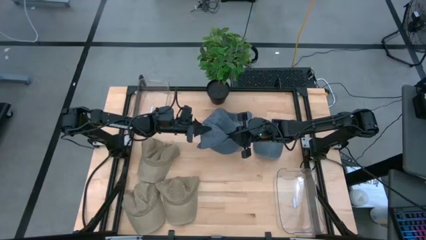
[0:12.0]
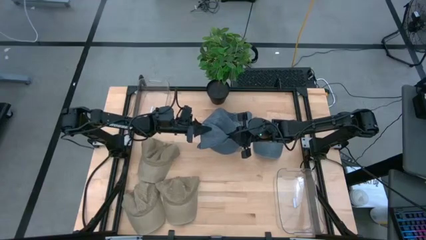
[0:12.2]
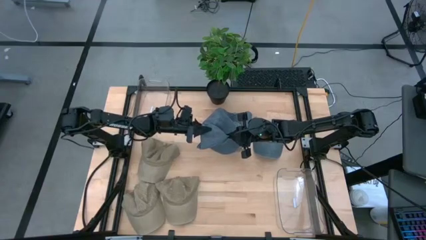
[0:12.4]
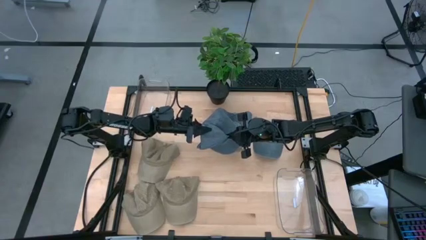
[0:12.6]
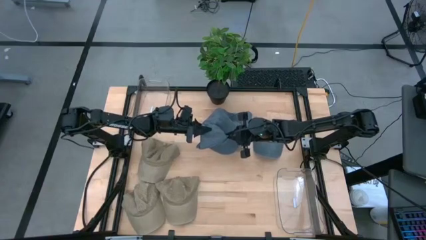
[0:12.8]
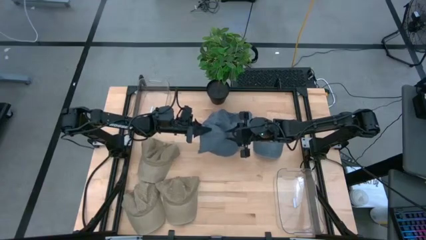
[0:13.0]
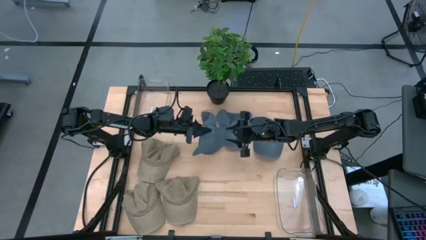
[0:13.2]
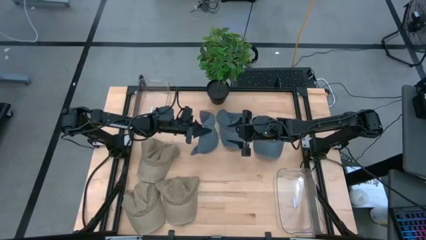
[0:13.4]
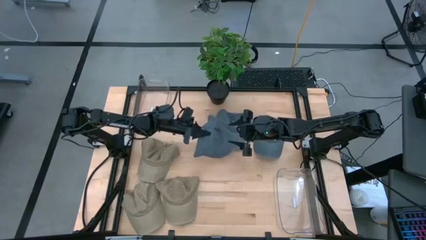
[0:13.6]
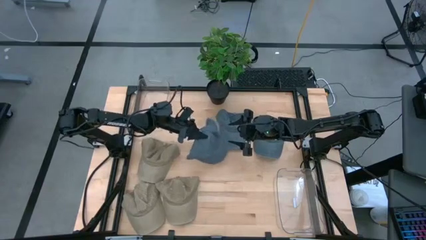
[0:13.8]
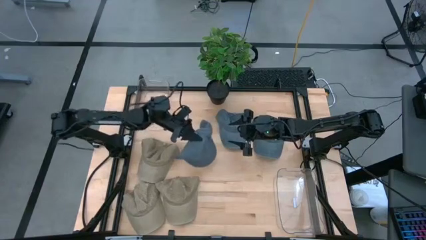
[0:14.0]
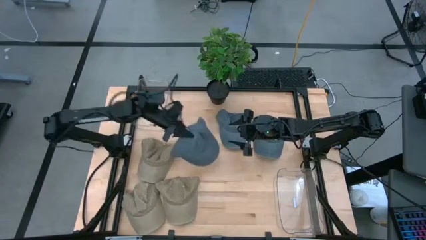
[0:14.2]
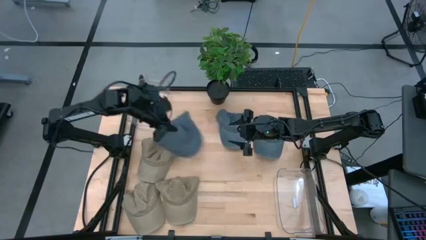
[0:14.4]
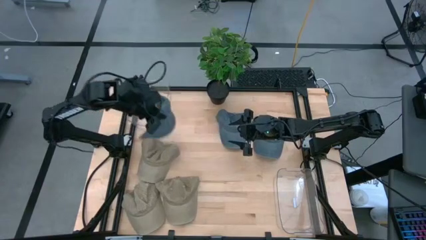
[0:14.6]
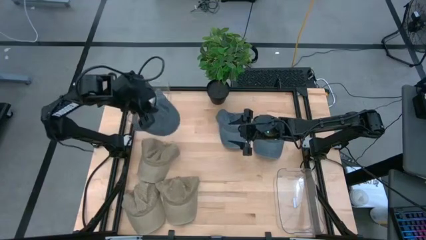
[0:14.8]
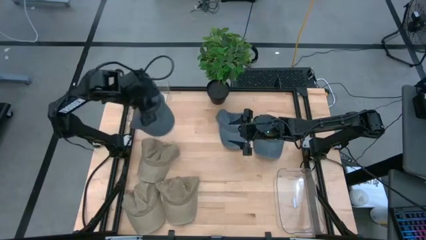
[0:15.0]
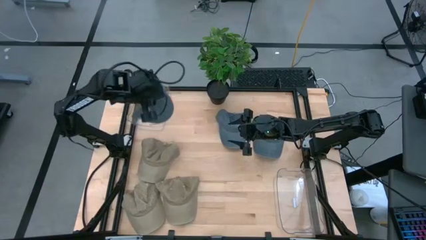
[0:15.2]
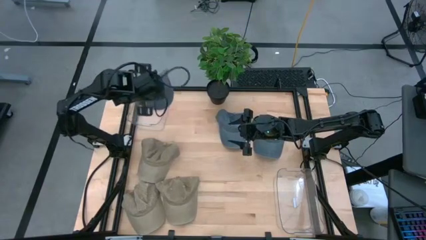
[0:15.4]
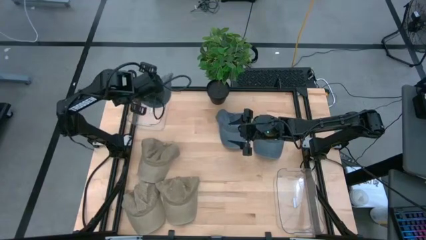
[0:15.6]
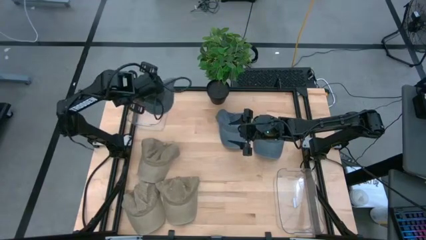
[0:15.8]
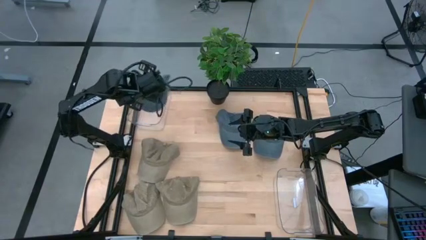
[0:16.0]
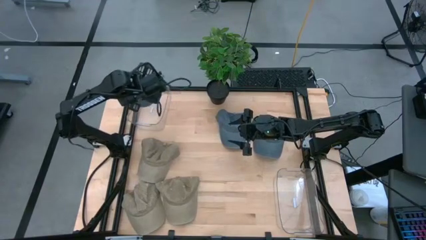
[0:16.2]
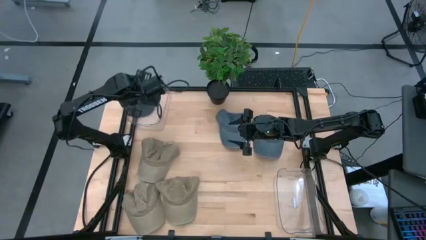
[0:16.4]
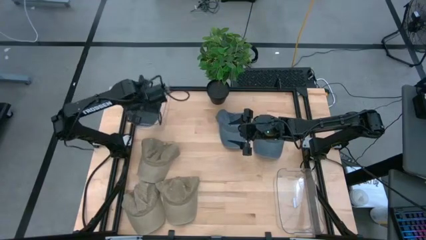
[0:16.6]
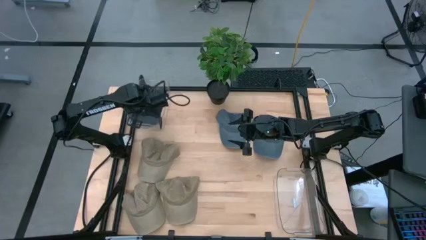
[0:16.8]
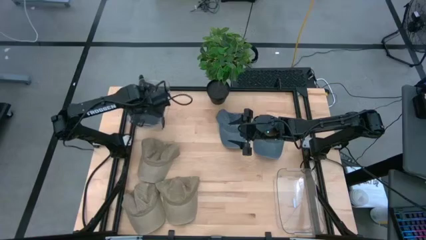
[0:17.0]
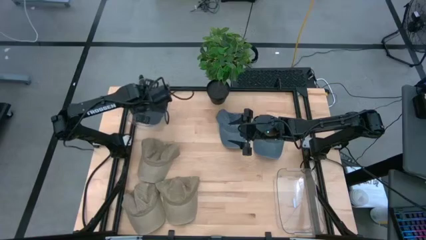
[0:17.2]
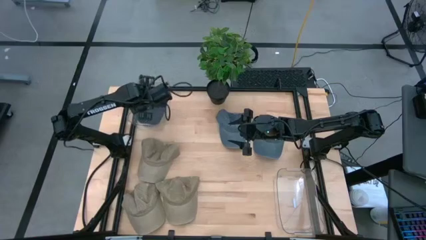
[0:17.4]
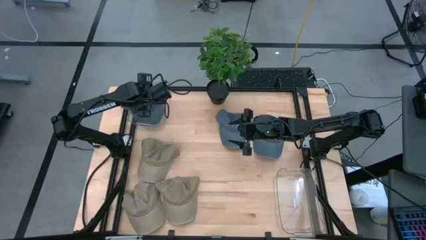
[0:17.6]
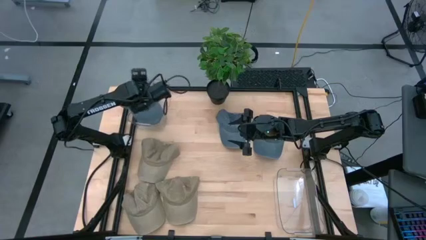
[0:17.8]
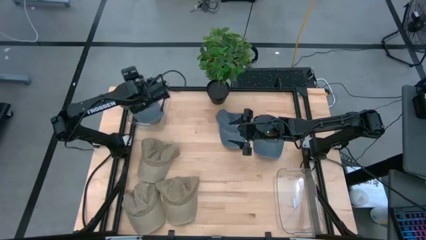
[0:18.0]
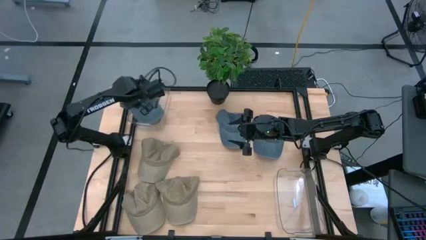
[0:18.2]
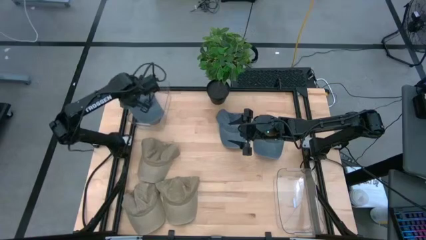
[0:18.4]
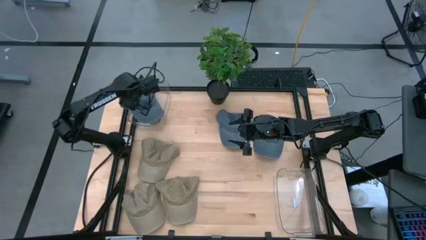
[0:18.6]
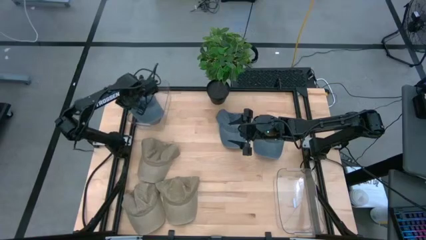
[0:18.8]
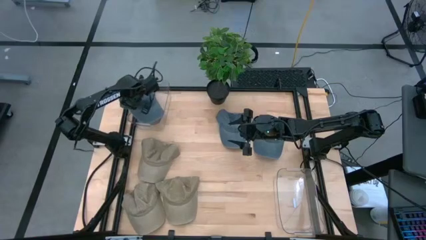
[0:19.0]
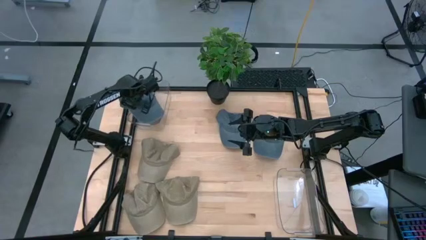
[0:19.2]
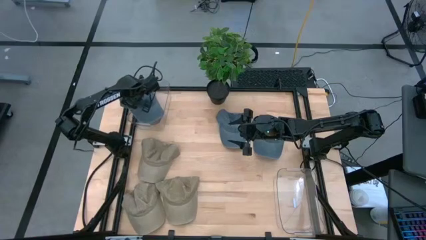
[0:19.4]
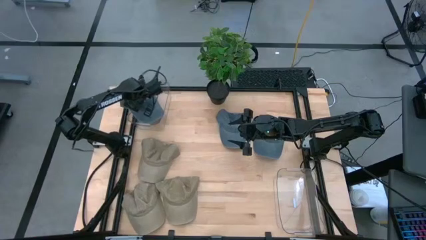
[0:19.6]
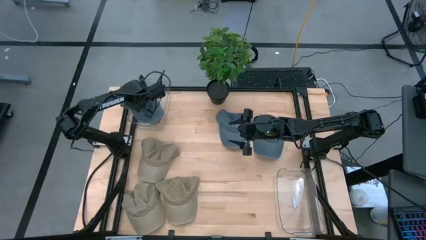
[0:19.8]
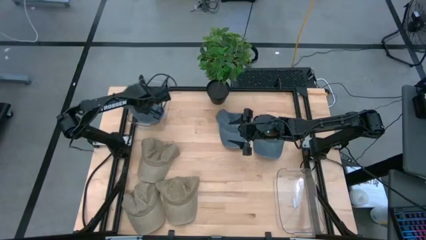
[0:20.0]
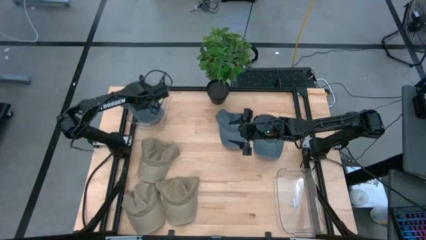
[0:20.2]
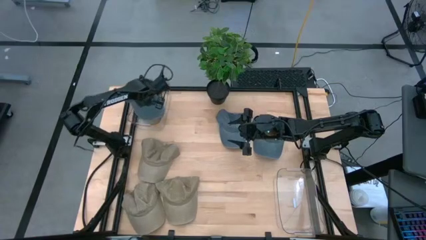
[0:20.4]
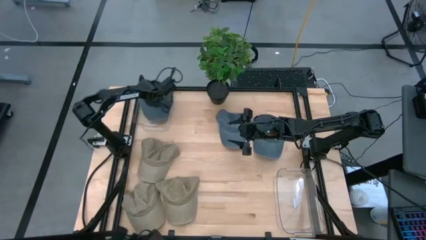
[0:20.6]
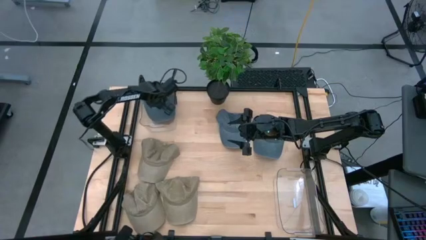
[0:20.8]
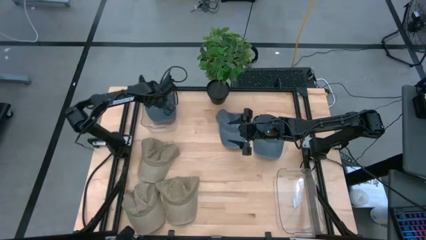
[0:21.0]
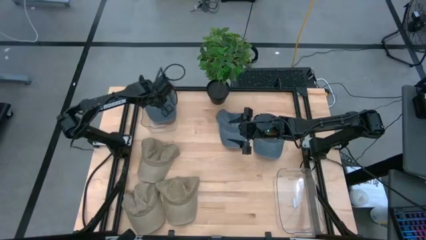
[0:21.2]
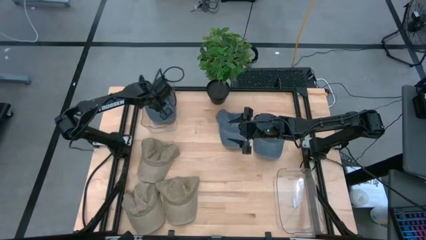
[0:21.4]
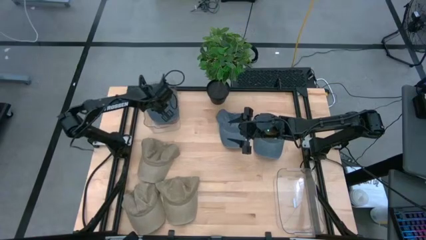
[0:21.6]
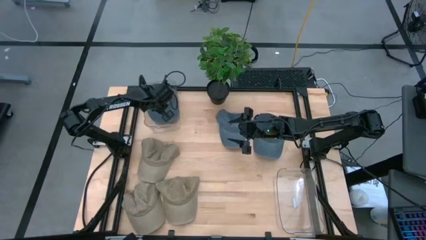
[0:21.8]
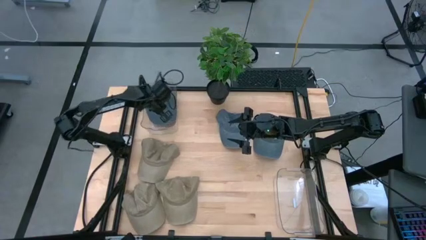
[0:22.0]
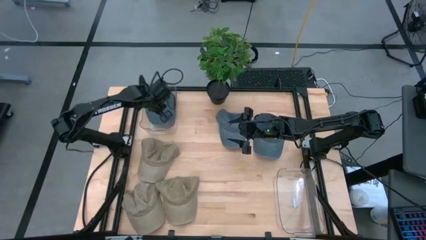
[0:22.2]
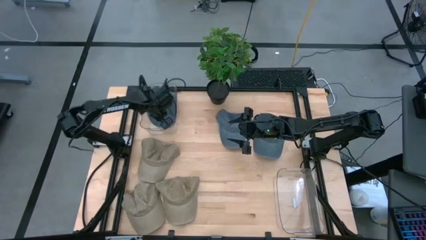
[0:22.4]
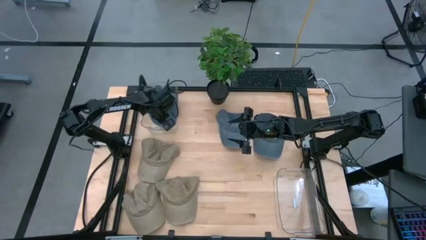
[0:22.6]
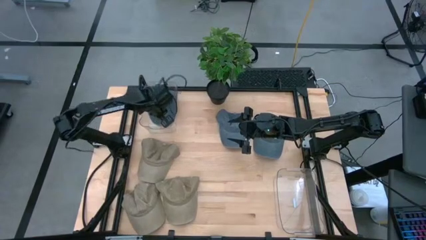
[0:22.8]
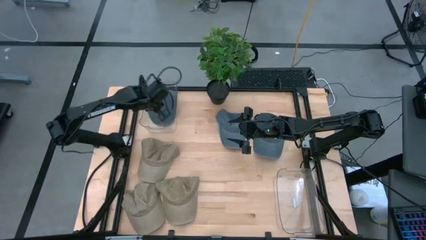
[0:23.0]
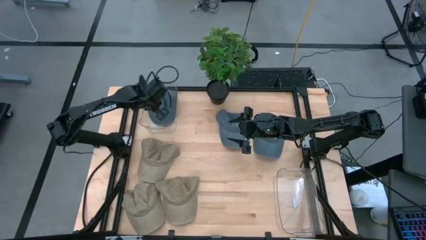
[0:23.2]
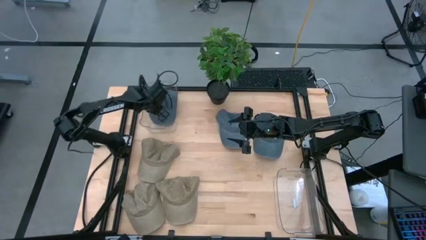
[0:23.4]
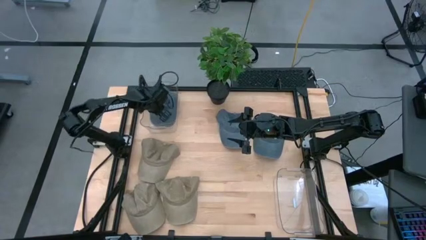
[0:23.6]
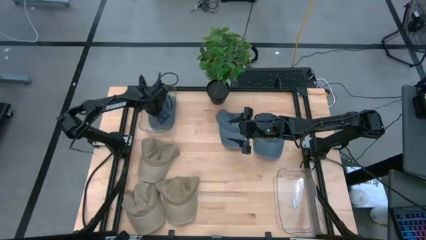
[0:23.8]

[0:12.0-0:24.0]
Task: Pick & Place hat
Put the top blue cap into the left transparent bin

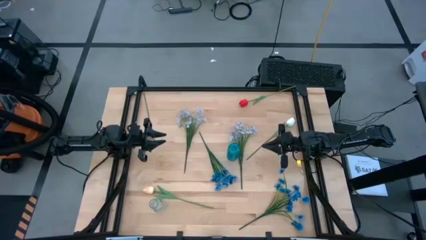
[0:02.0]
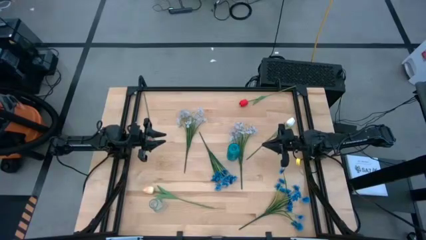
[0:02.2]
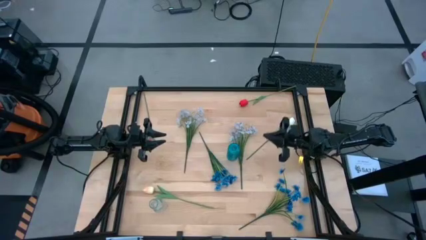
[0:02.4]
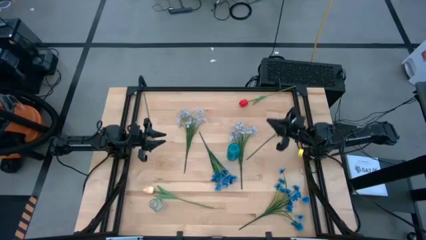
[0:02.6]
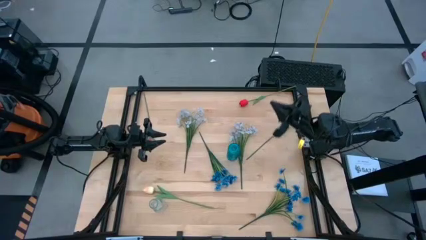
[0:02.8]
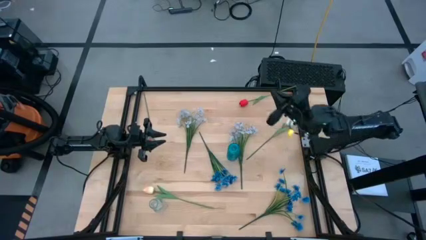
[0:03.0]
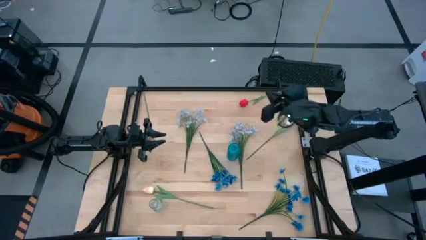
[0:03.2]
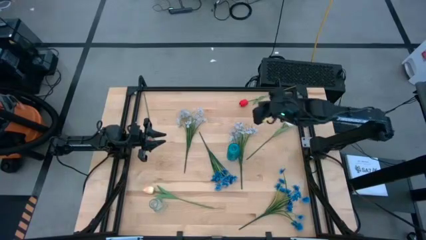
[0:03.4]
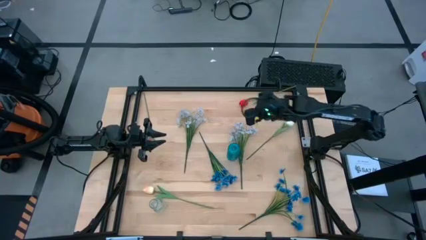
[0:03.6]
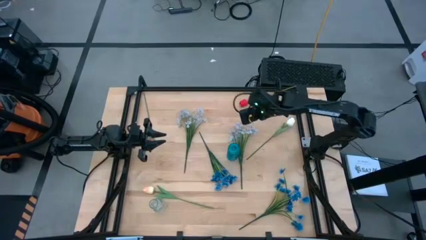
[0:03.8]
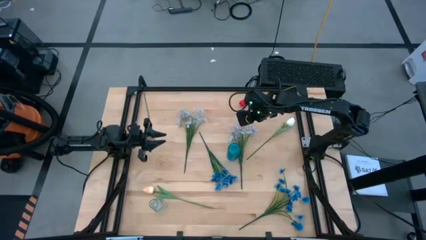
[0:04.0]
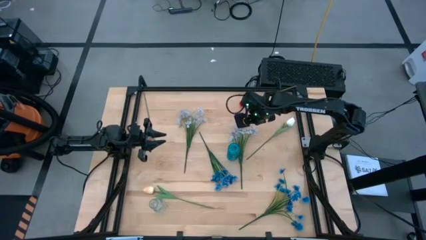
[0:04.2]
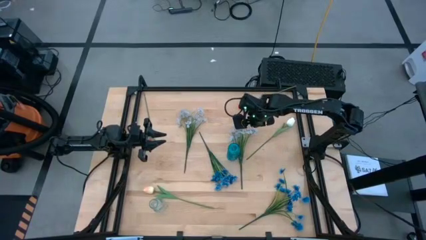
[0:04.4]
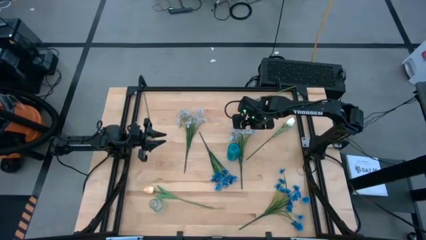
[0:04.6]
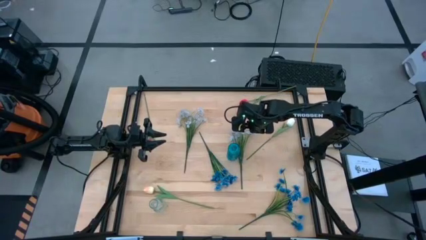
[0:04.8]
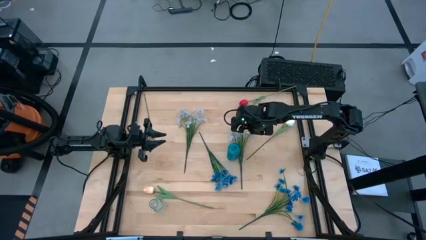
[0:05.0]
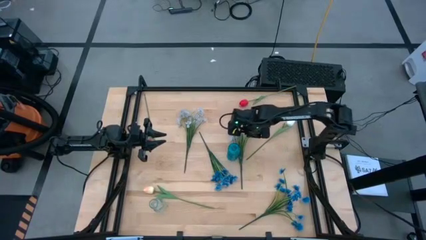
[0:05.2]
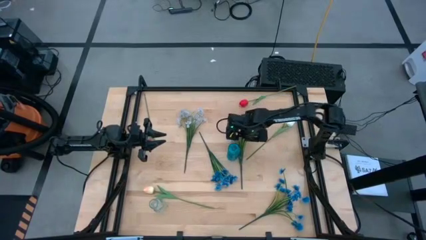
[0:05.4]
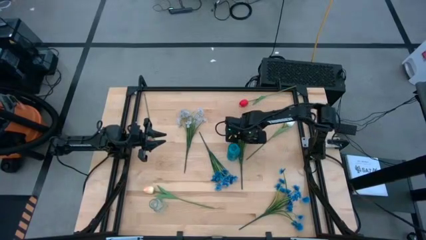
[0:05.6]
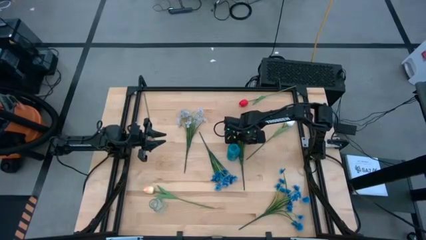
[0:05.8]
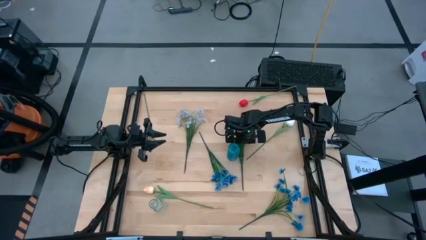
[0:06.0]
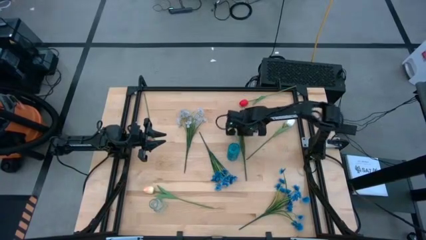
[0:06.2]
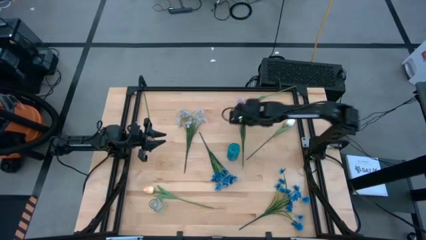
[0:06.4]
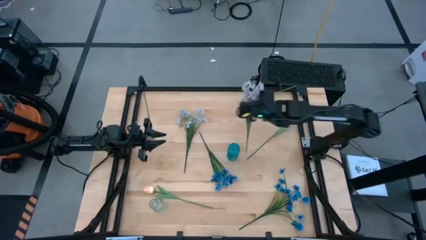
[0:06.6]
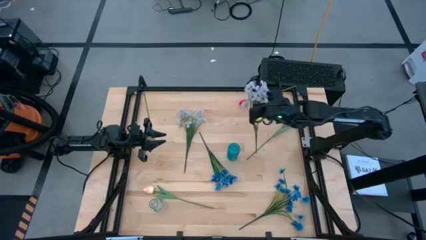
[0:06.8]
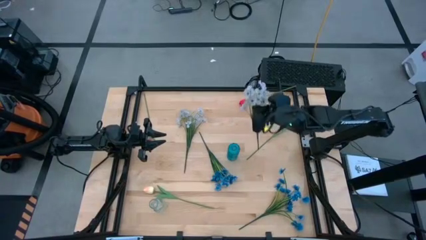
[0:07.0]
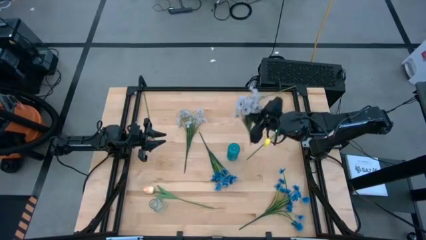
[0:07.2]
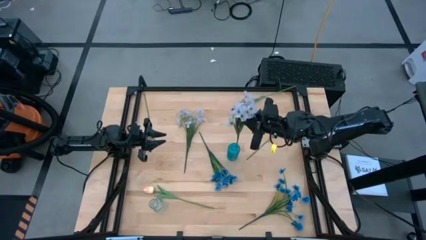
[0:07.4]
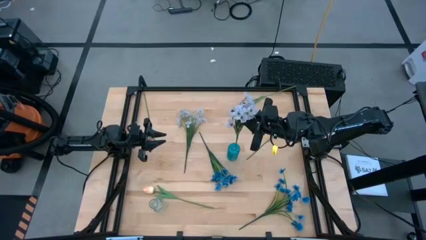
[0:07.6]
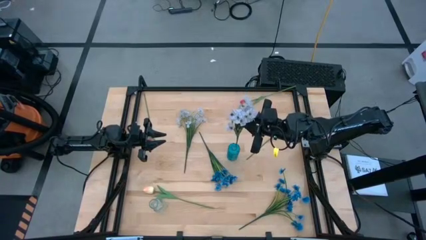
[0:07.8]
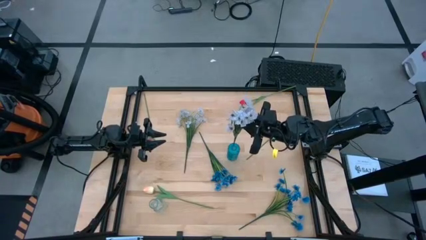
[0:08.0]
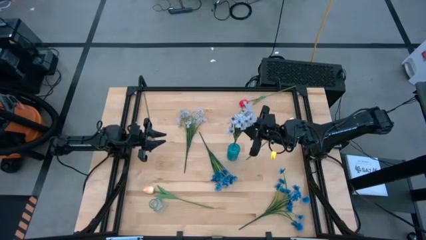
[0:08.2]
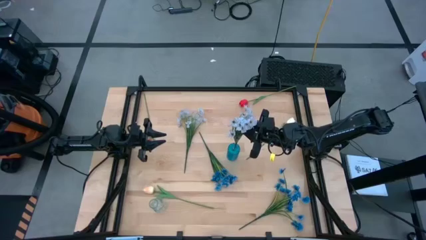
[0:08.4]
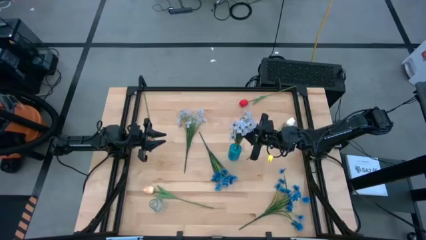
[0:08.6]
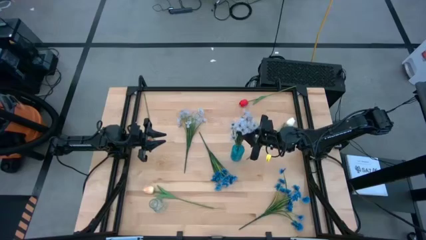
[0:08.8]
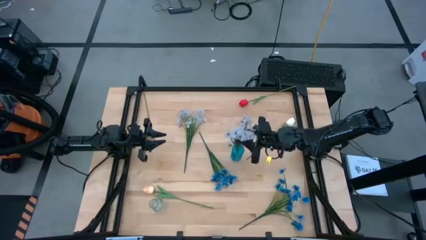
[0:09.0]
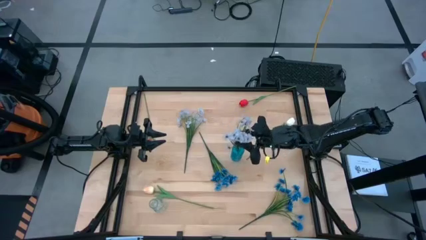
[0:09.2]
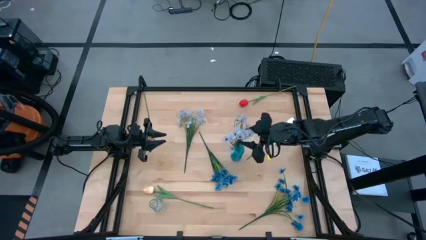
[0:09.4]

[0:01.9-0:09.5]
Task: Sort flowers into vase by color
Put the right white flowers into the blue flower vase
